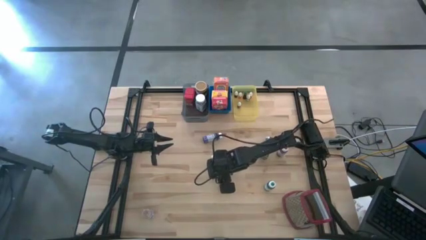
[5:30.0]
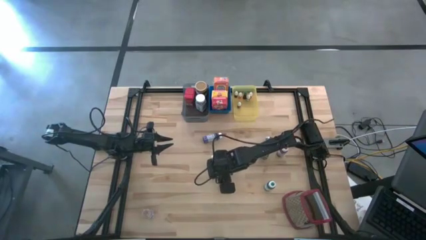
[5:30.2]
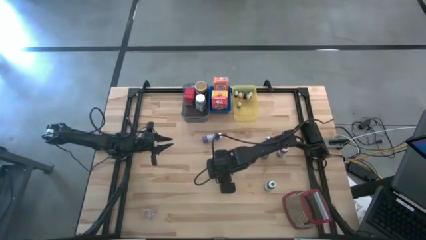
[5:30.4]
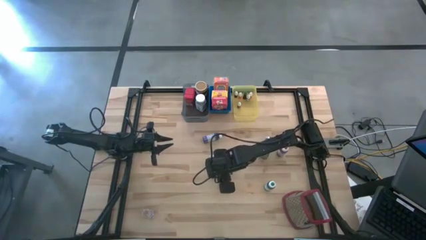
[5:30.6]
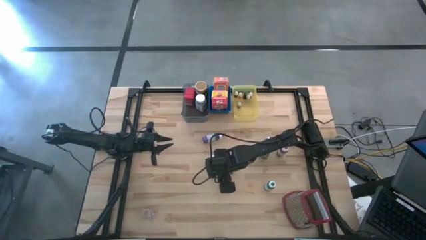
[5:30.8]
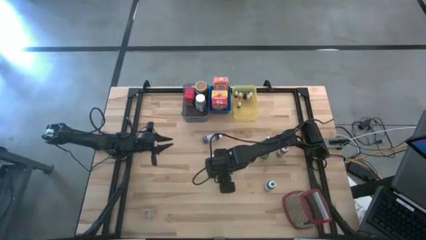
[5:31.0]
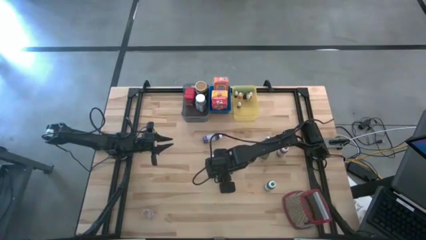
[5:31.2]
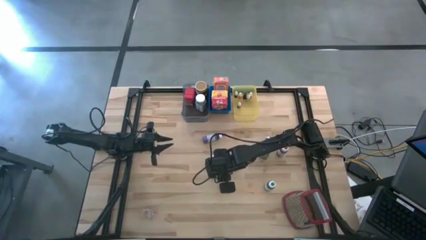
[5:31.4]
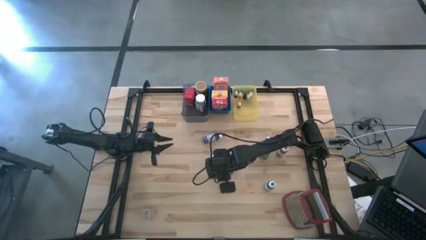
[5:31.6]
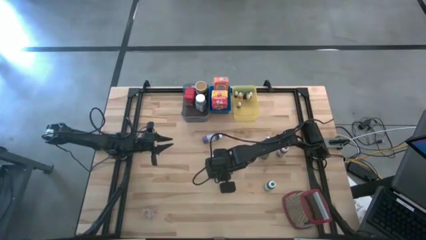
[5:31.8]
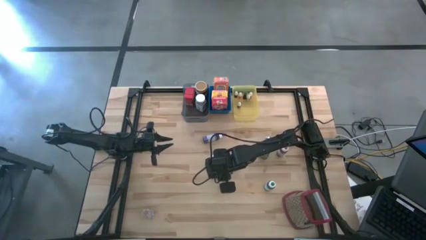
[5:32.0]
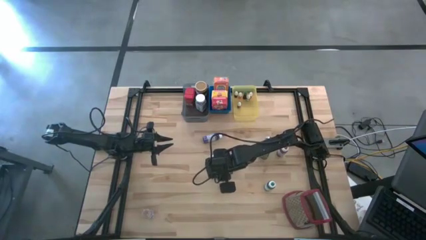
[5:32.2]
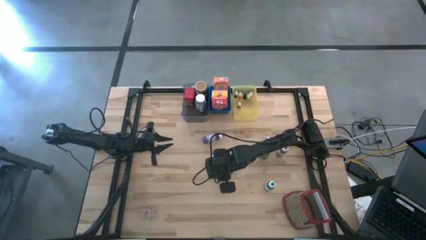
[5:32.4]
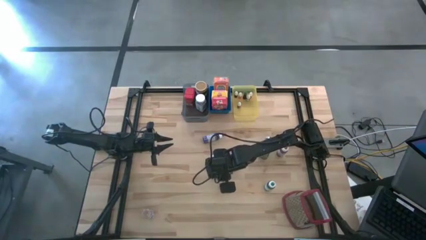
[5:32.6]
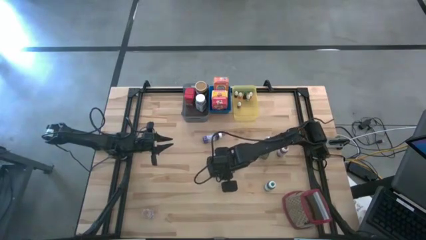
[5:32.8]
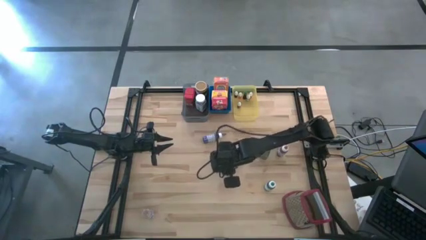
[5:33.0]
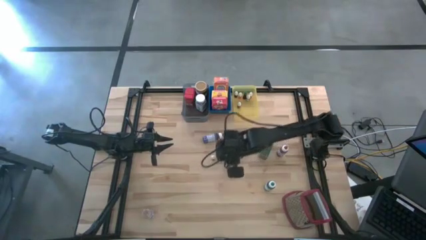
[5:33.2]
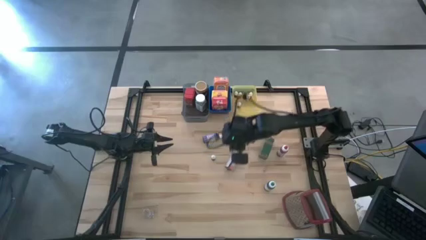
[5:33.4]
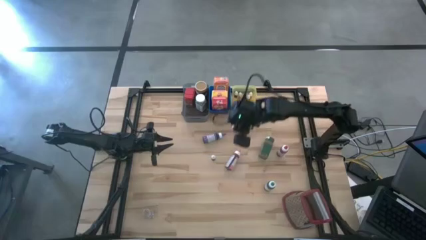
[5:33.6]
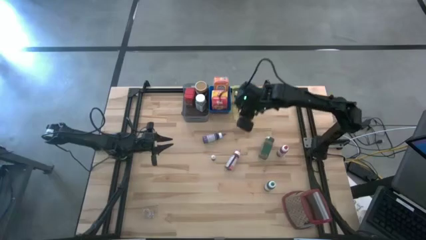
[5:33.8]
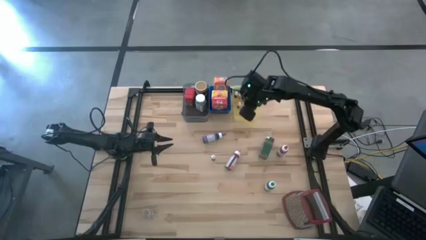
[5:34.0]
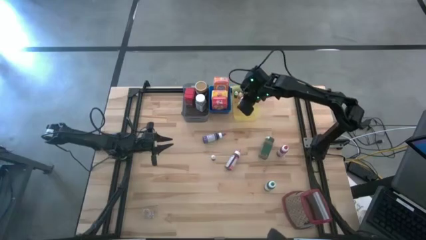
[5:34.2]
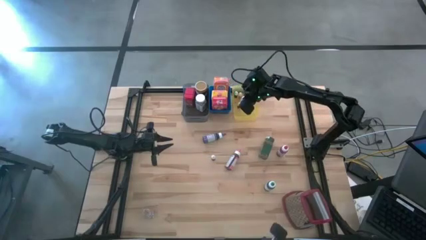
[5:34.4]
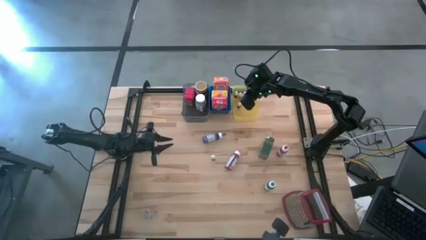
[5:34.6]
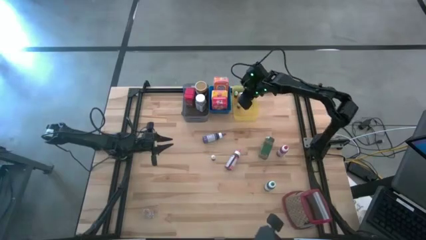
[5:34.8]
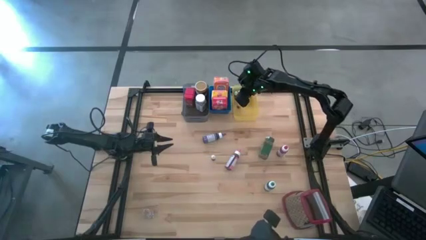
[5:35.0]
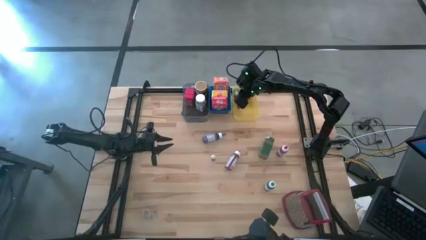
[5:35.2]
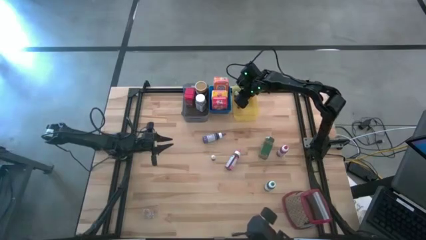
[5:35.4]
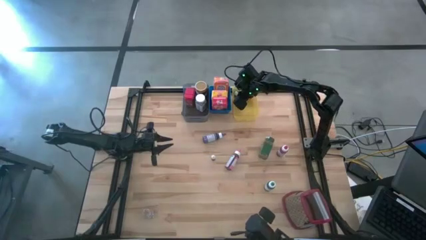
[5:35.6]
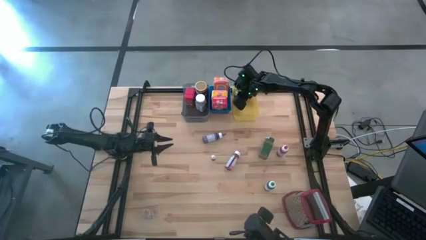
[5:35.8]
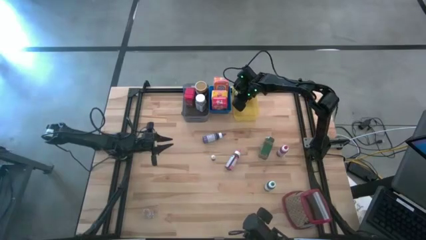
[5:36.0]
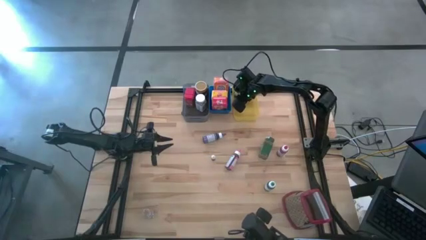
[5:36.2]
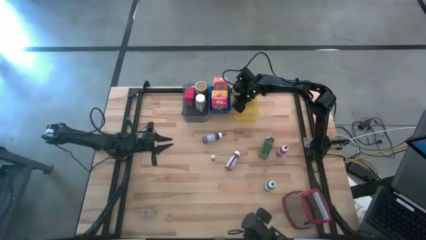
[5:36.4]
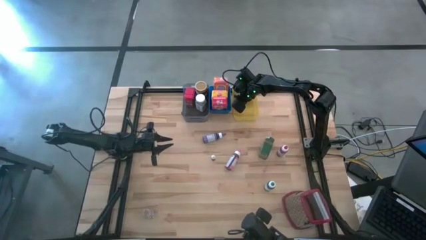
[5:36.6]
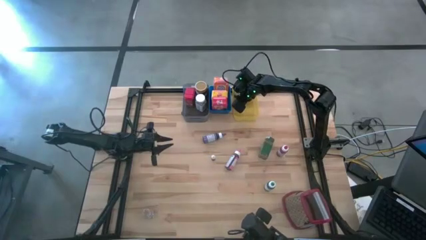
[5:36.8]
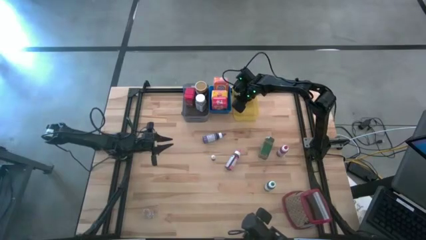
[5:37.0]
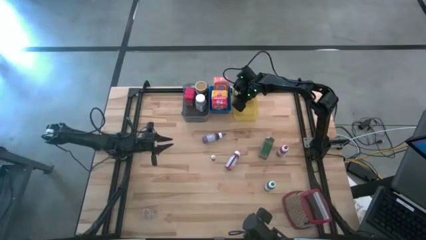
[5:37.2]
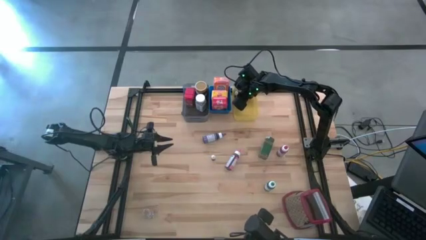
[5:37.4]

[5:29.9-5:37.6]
Task: Pick & Place Kitchen Items
Put the small pink food coloring bottle into the yellow bin

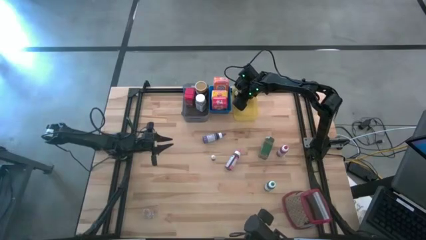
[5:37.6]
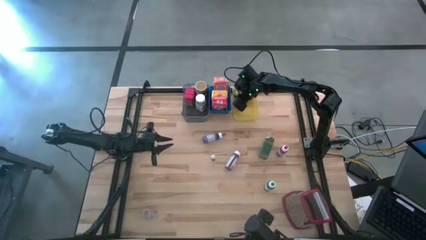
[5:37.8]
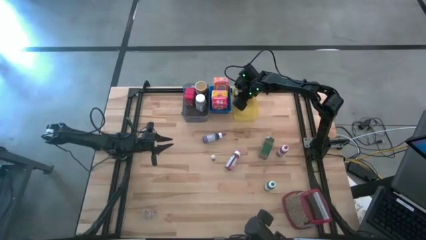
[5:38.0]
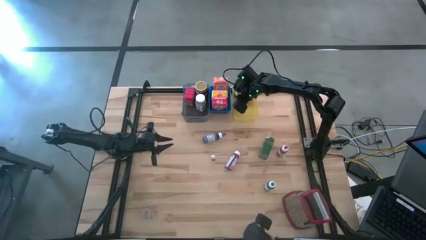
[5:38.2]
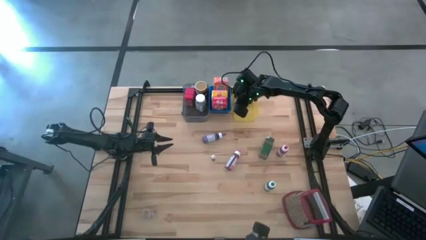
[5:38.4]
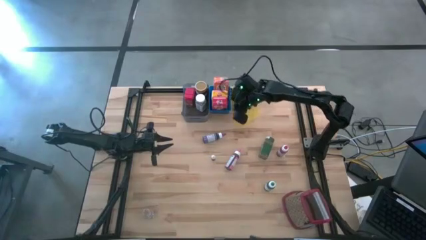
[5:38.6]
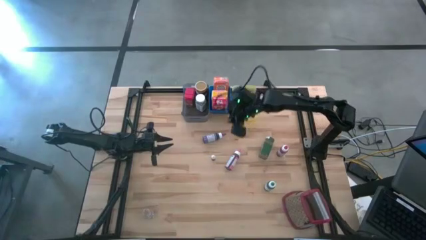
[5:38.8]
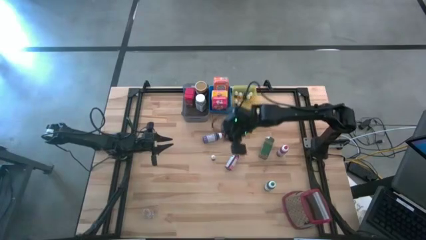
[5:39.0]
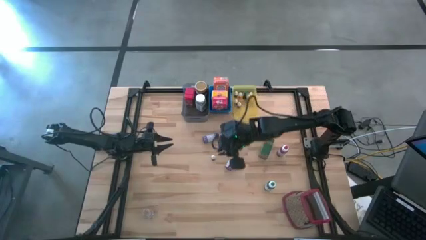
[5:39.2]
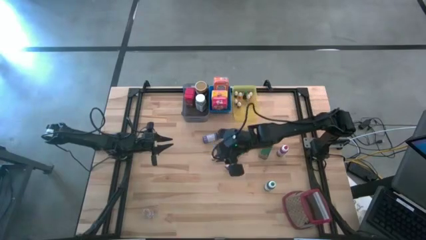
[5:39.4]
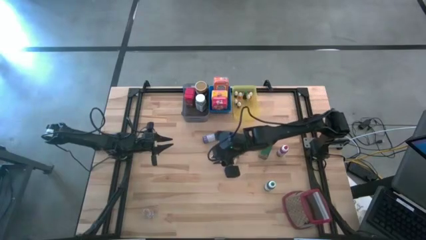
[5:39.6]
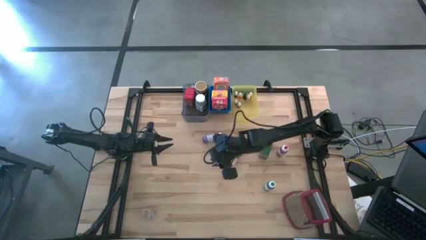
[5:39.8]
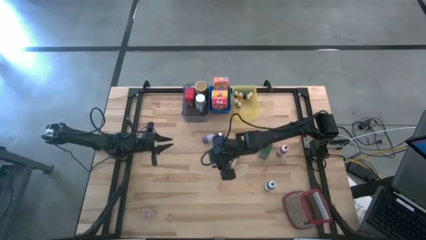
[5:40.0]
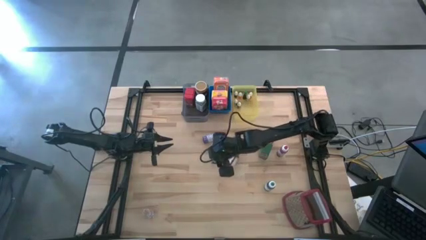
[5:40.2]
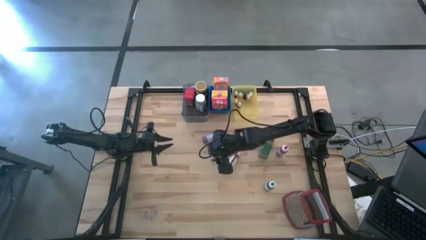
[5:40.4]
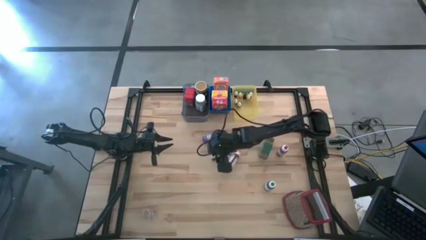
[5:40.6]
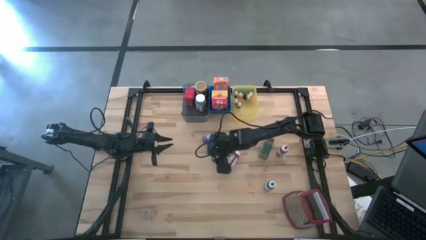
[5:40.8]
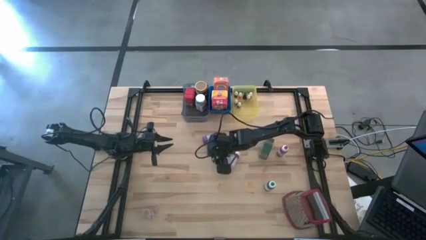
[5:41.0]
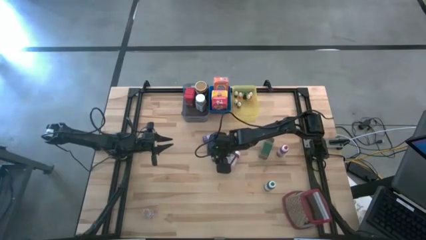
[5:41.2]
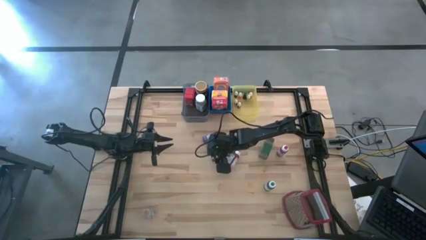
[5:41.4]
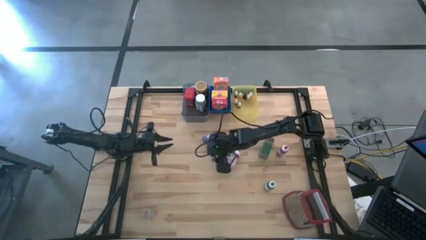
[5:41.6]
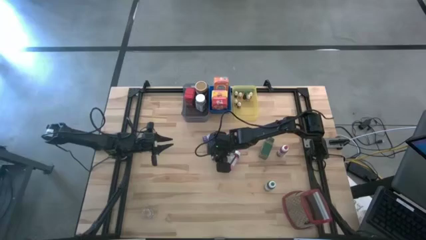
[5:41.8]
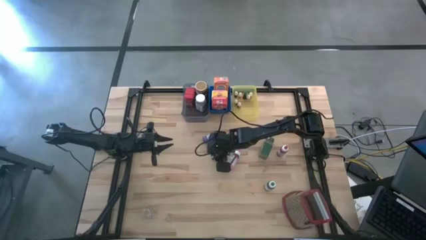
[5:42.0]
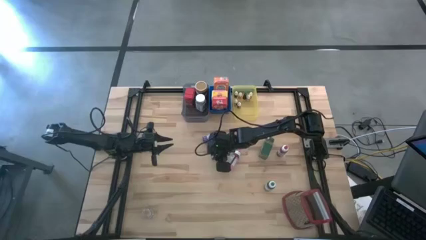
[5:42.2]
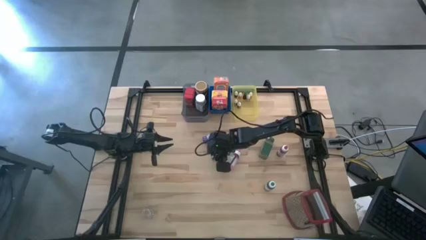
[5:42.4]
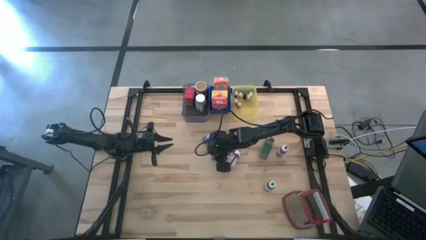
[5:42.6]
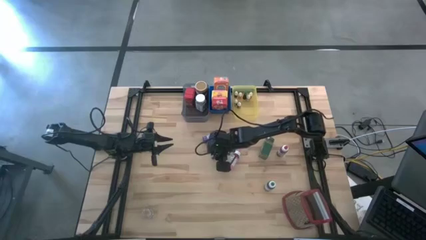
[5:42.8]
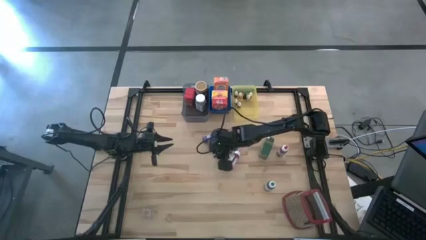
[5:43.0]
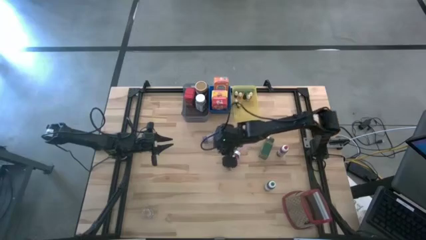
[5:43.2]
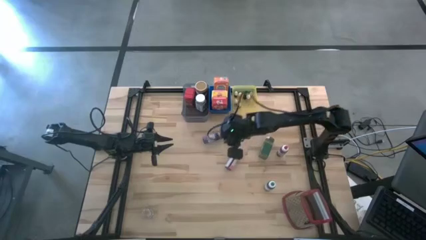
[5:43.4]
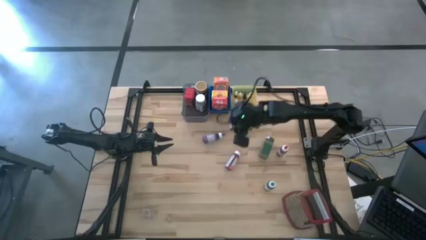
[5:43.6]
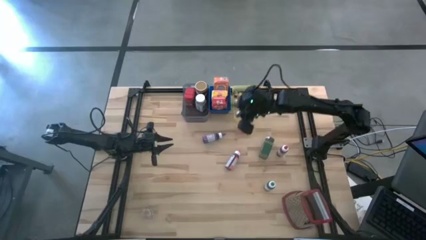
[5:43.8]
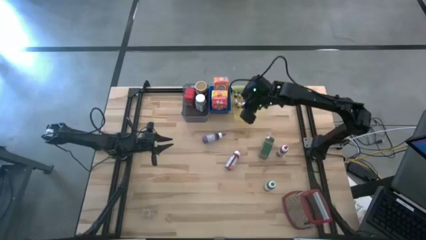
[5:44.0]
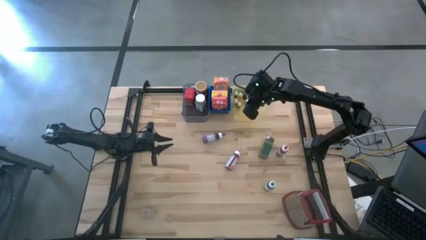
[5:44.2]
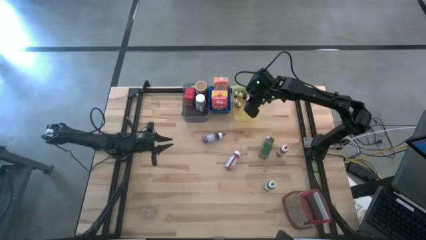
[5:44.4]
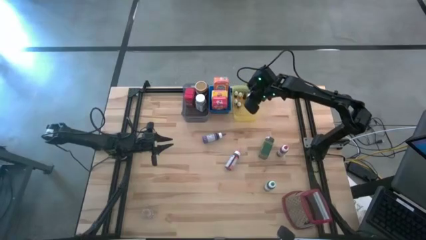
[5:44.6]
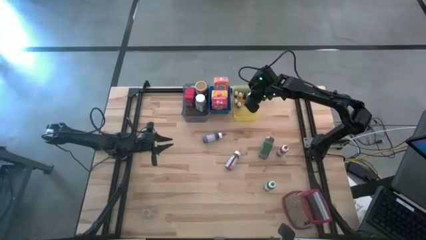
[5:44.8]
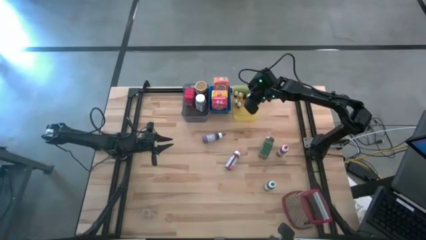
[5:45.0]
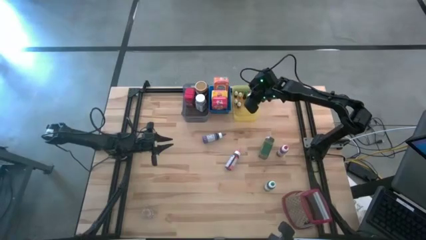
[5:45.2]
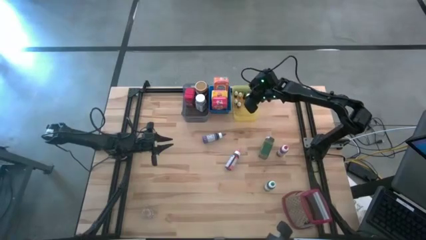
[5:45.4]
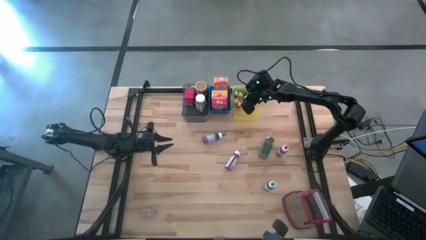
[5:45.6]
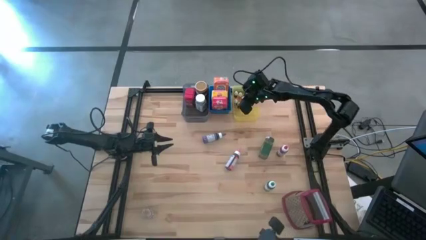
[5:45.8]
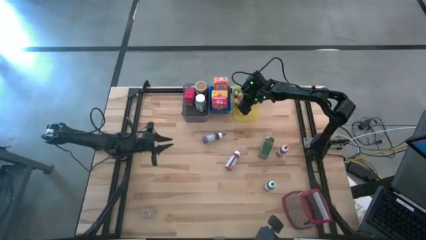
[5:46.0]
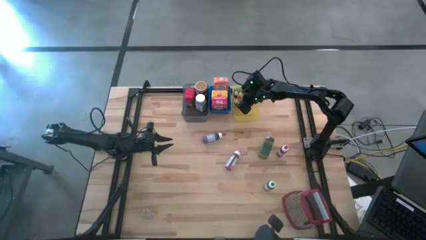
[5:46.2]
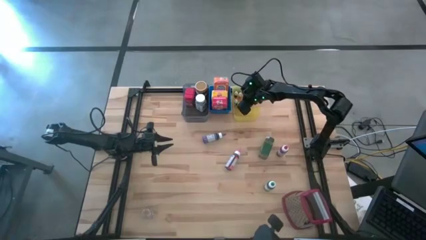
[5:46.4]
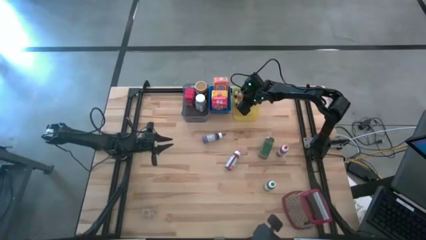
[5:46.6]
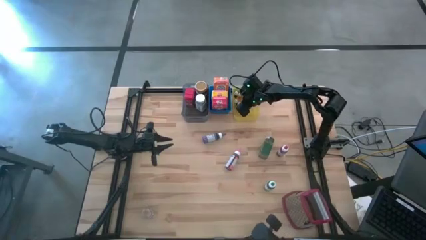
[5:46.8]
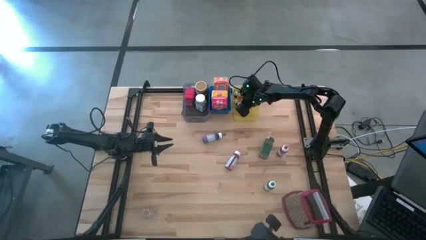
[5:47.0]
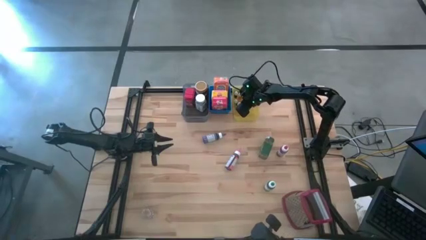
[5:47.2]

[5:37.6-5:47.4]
Put the black food coloring bottle into the yellow bin
